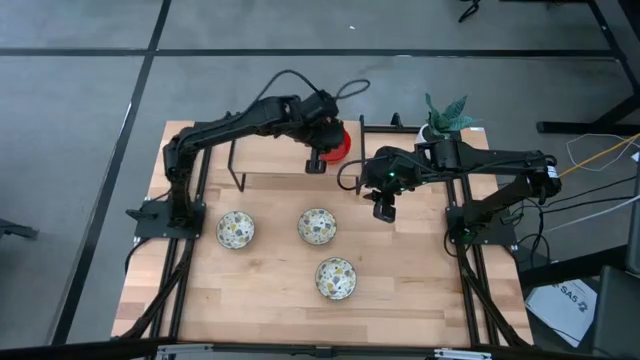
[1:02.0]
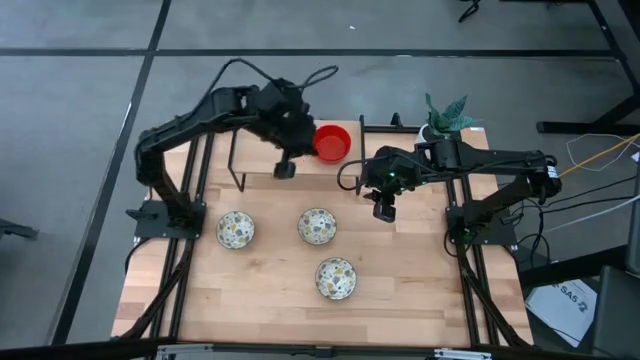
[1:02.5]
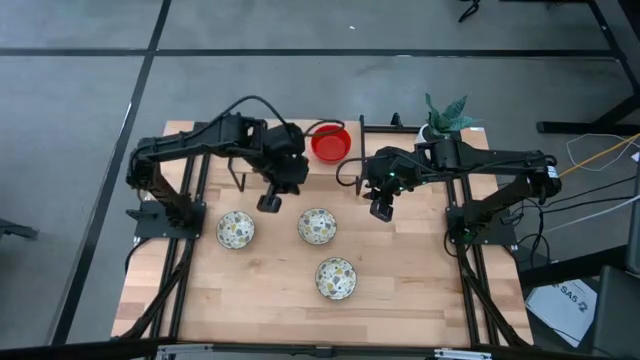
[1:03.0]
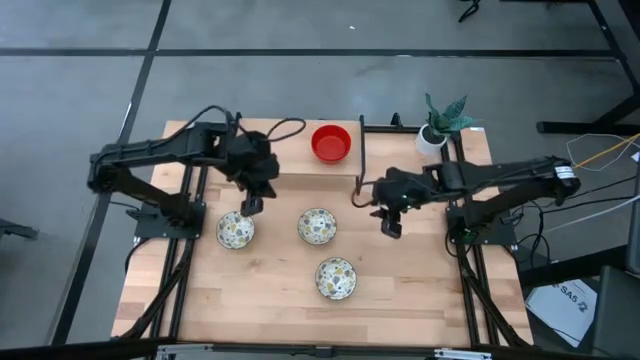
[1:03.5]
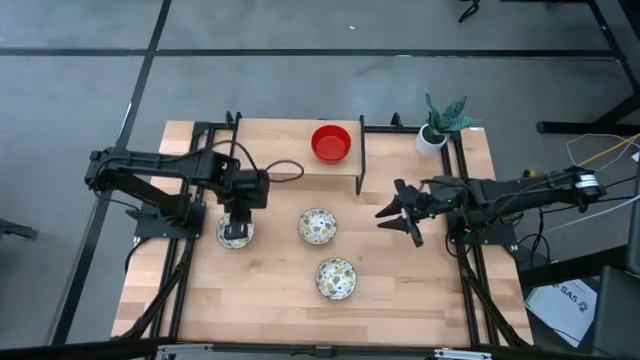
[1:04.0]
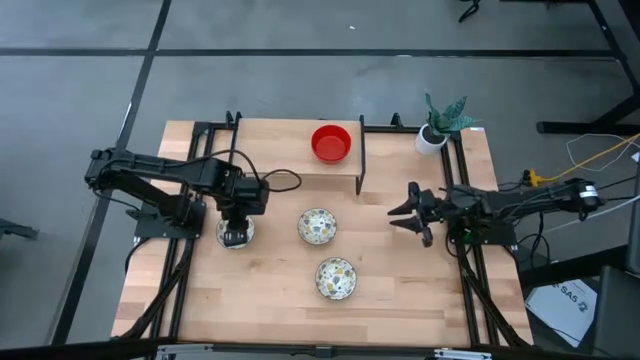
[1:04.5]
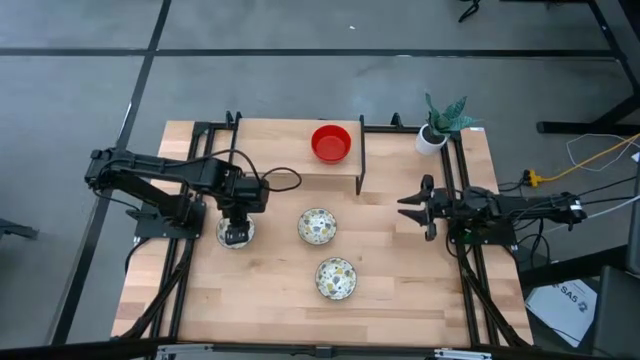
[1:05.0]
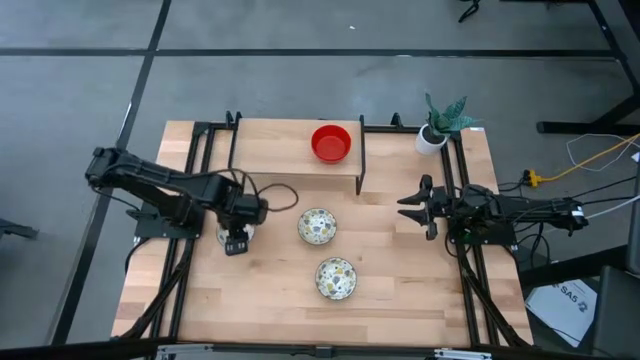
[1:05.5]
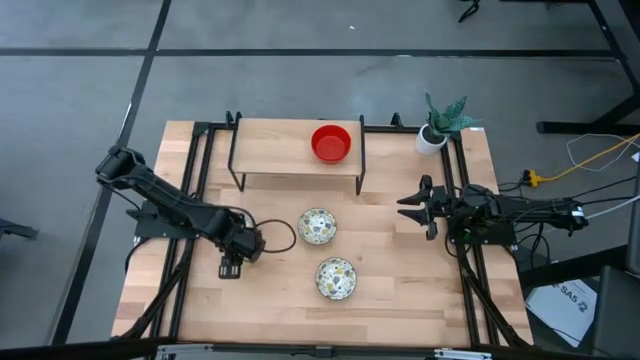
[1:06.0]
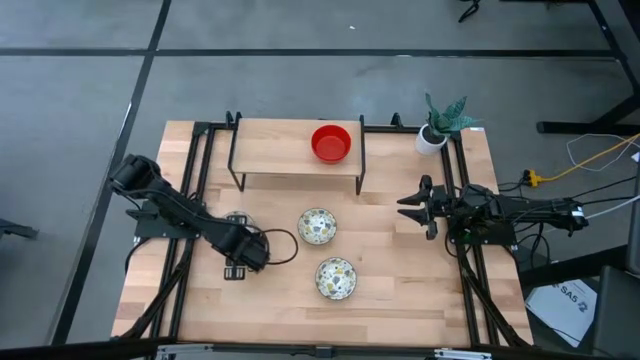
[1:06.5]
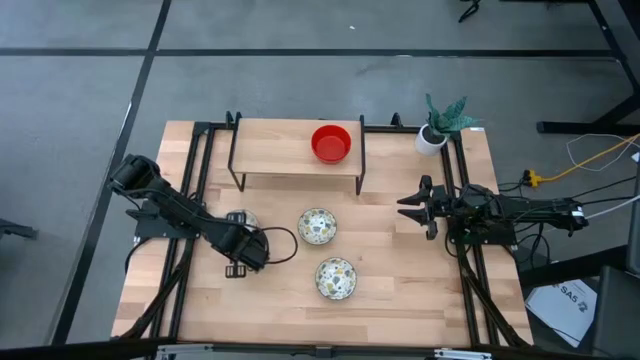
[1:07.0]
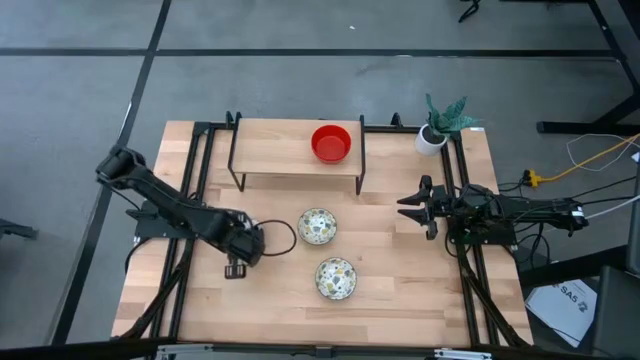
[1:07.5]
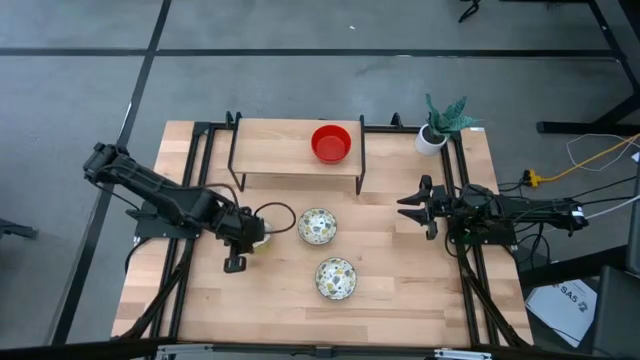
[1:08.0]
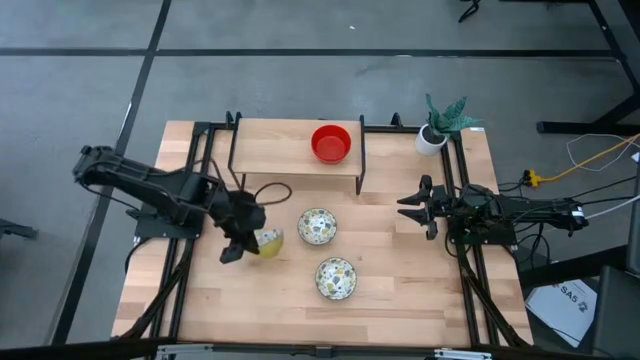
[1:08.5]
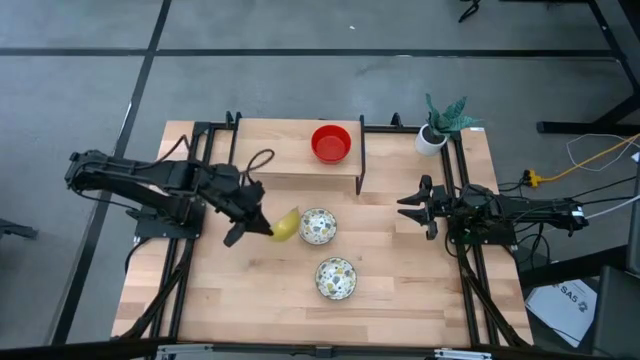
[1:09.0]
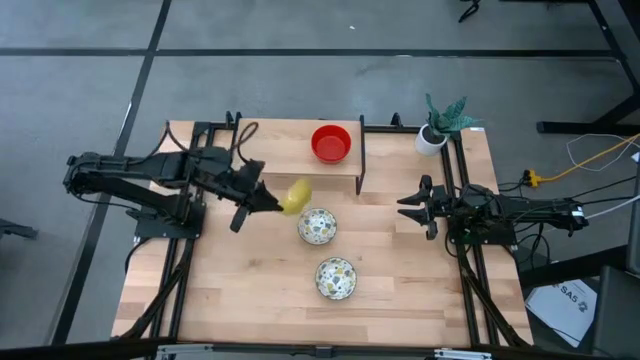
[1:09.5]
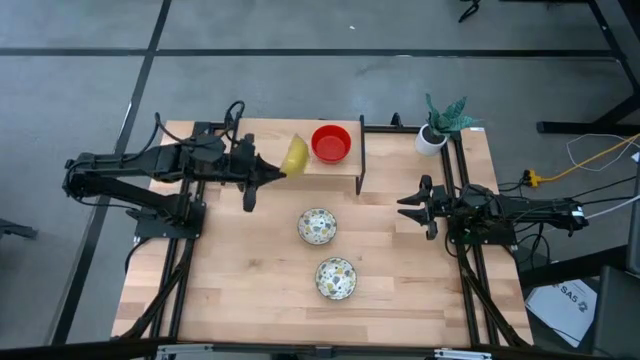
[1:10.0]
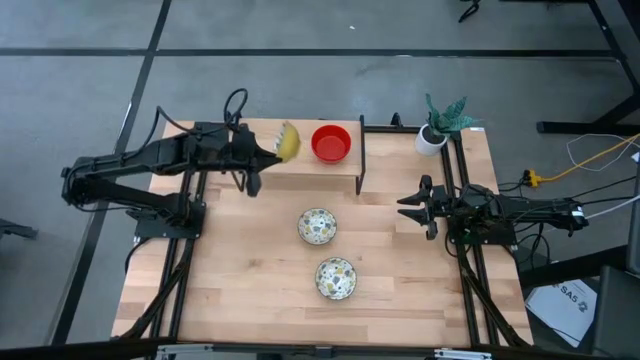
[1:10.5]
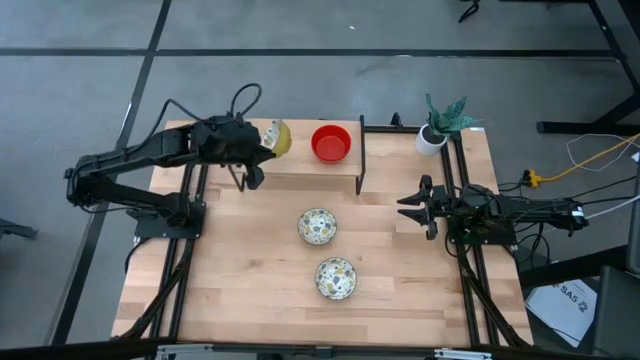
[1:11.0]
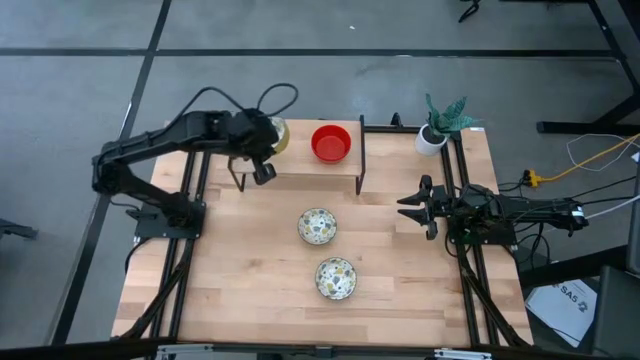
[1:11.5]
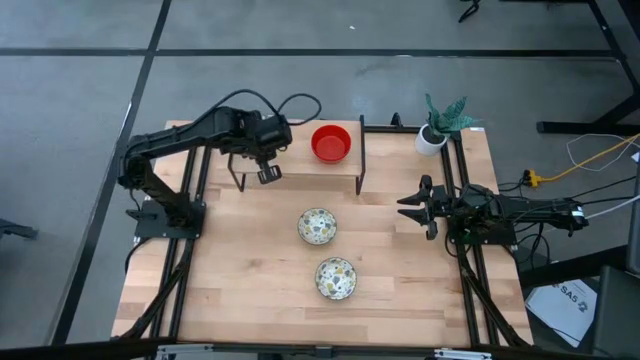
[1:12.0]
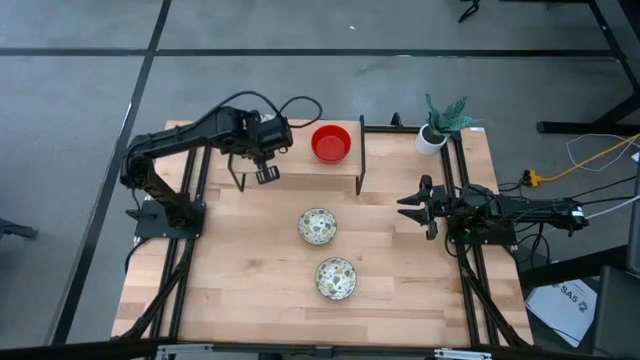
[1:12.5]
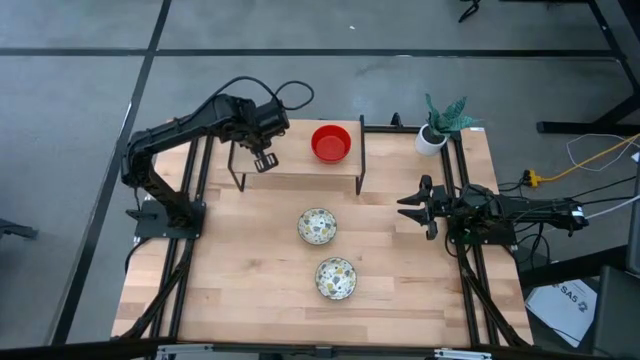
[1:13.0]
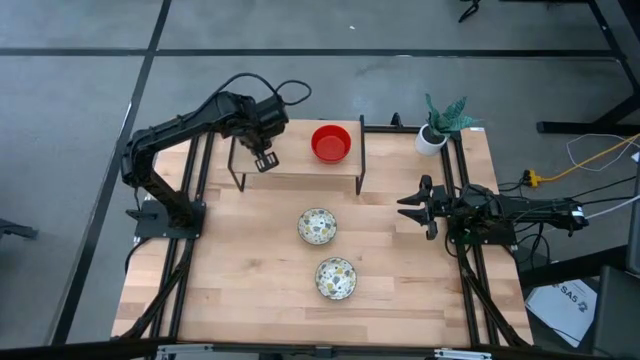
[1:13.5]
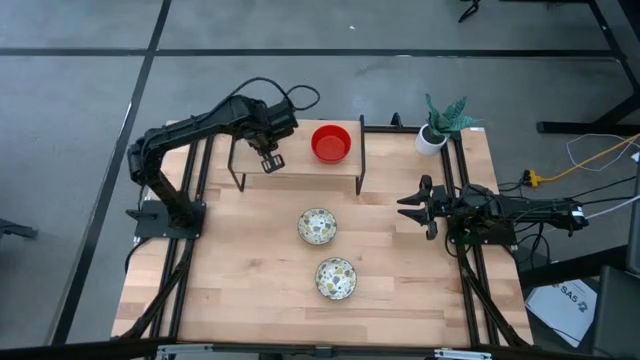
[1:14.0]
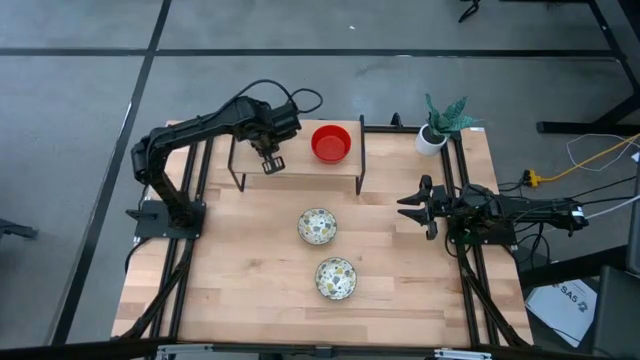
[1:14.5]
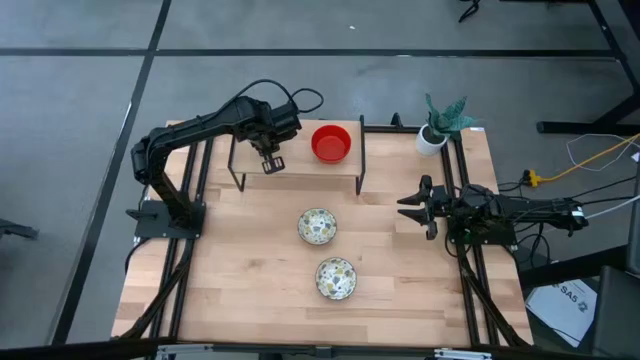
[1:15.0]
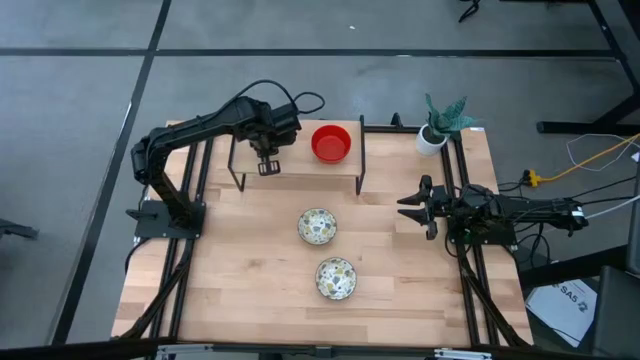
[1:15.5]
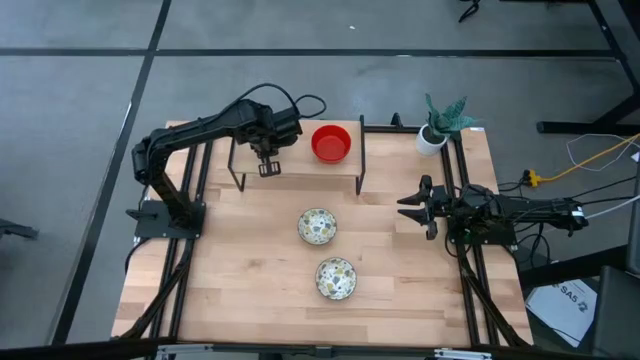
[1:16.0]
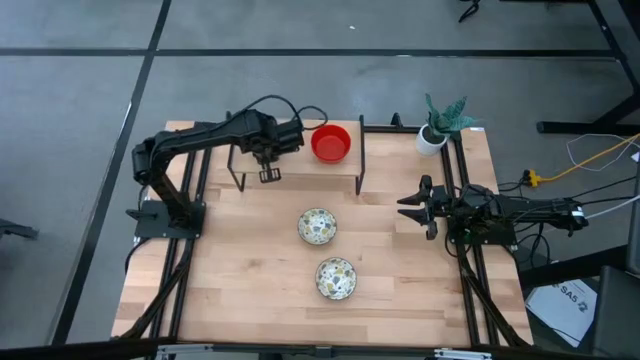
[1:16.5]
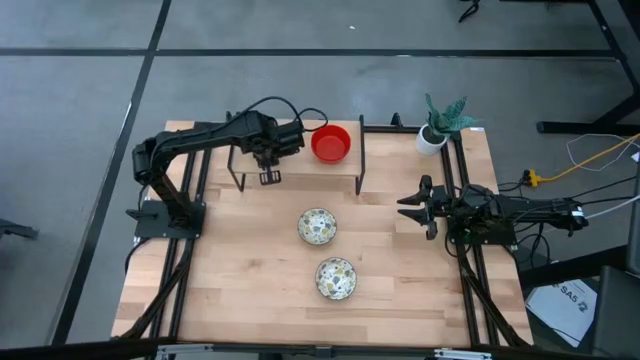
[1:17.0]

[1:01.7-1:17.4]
Task: Pick & Place Mini bowls
Put the left white patterned bowl on the shelf
